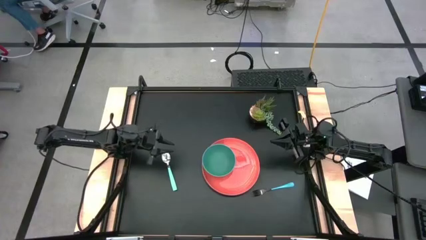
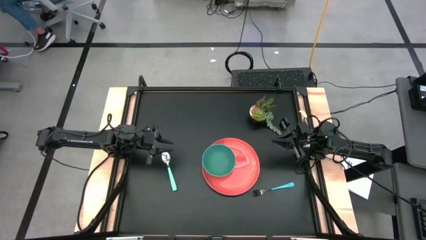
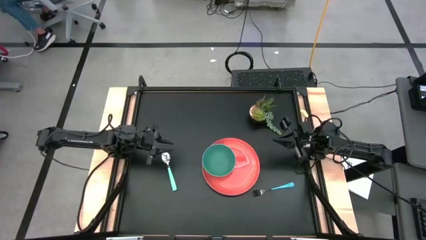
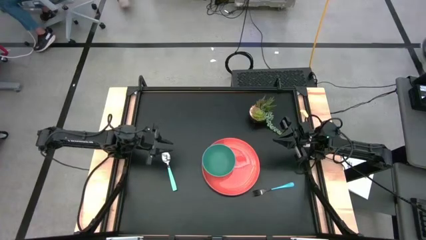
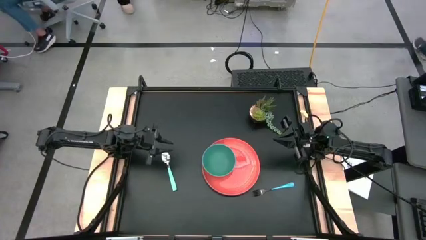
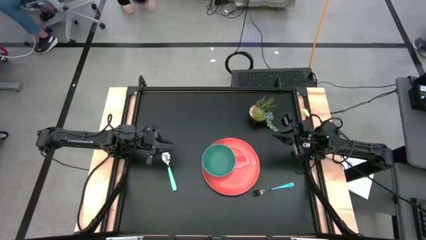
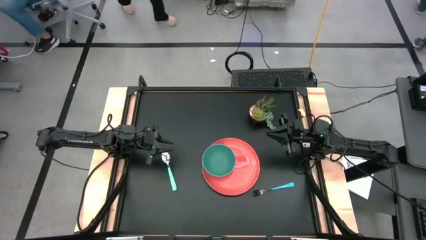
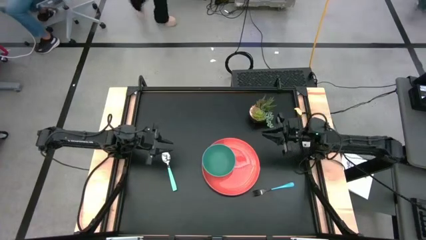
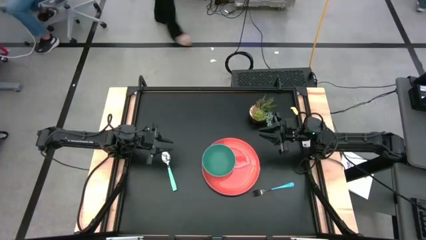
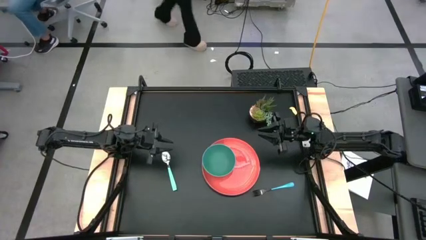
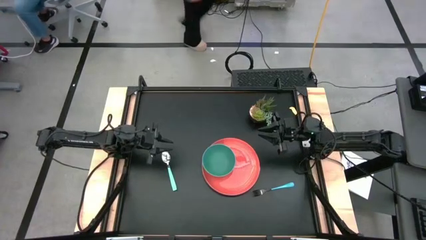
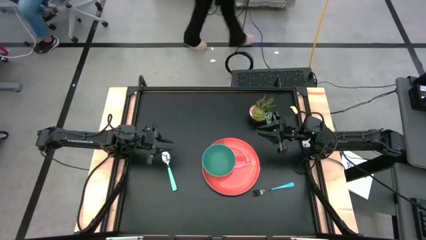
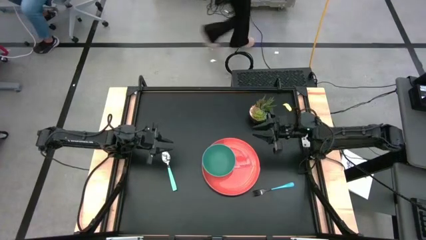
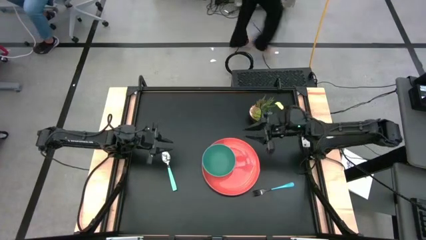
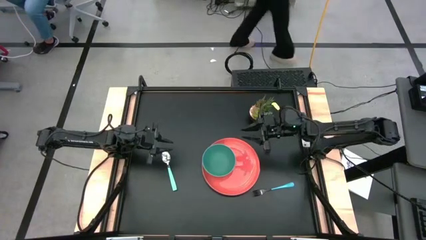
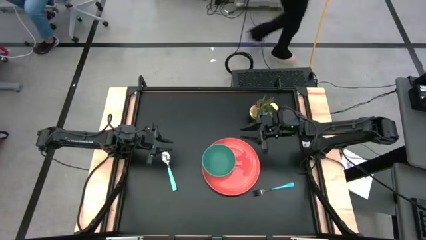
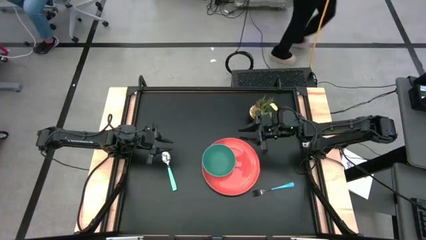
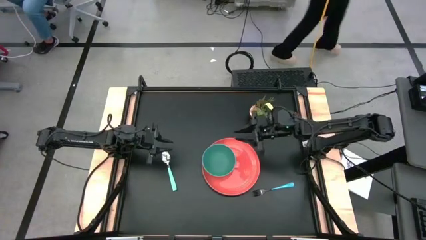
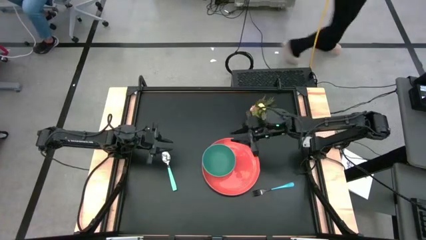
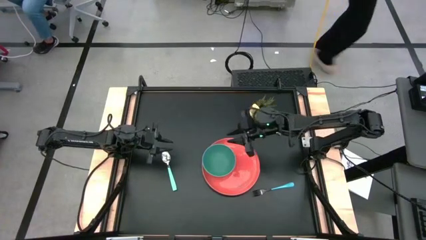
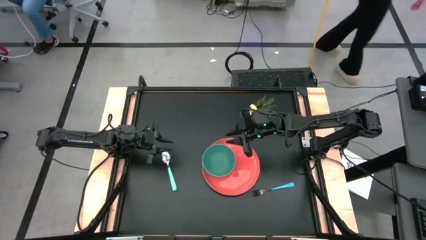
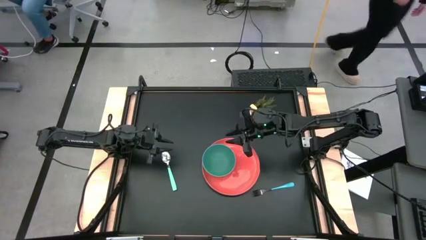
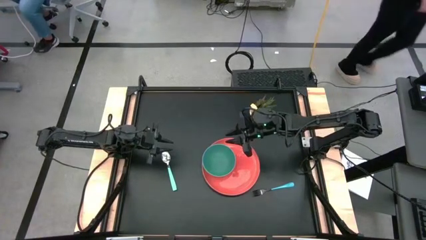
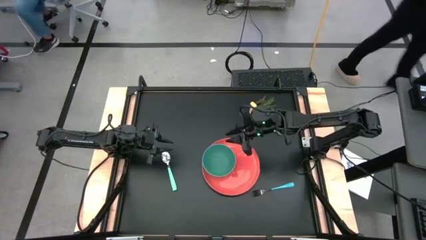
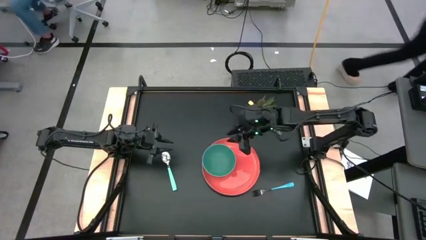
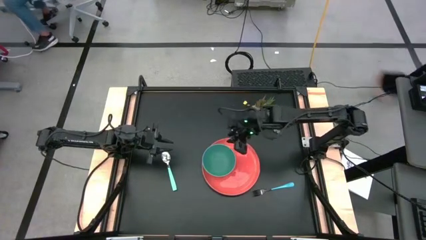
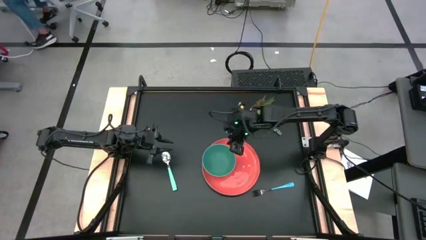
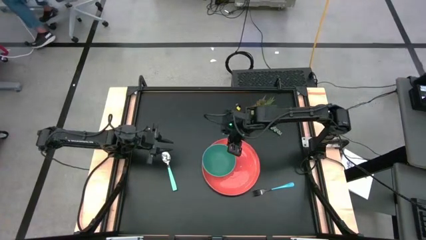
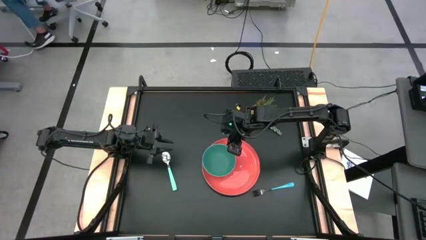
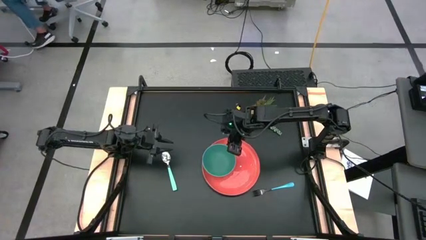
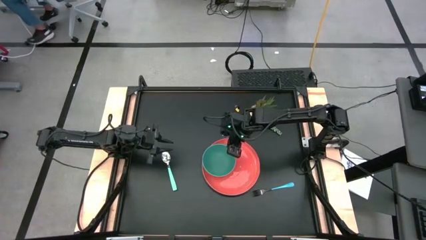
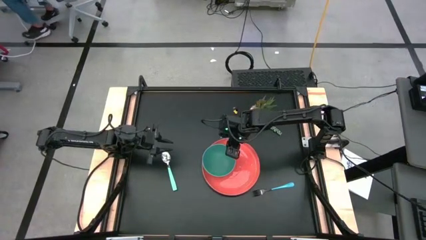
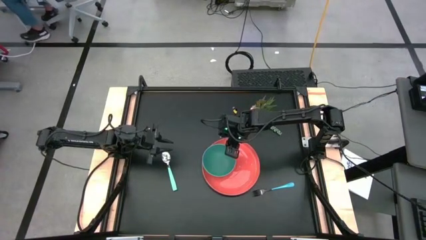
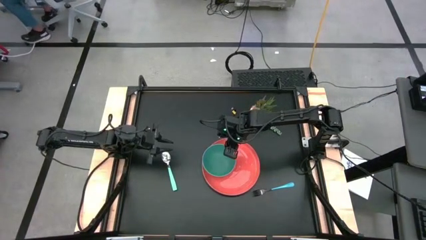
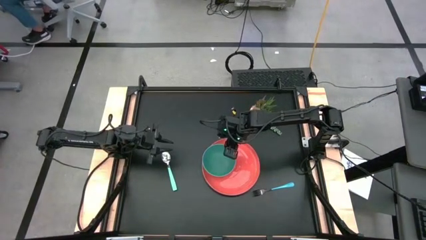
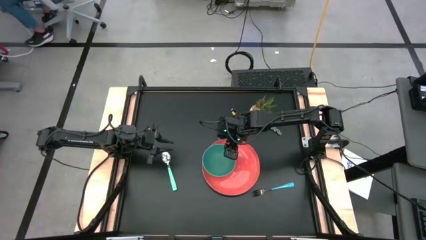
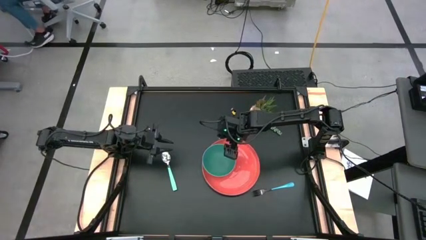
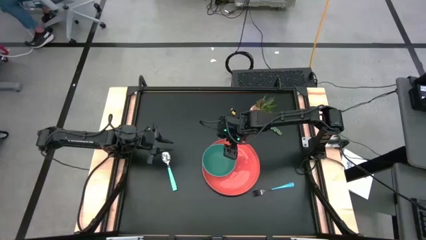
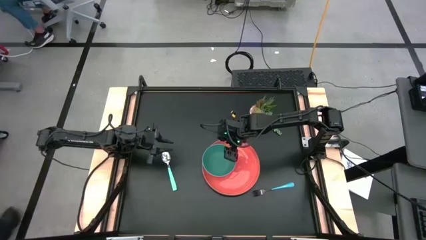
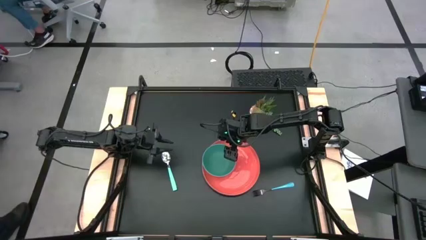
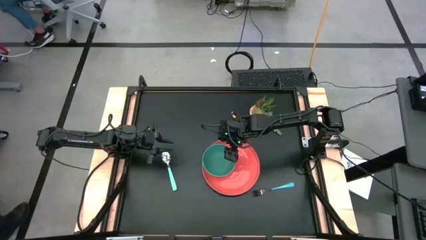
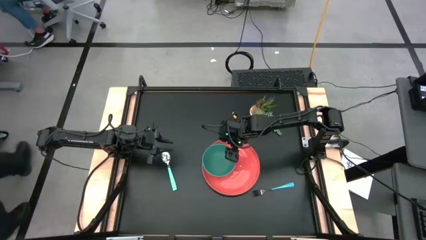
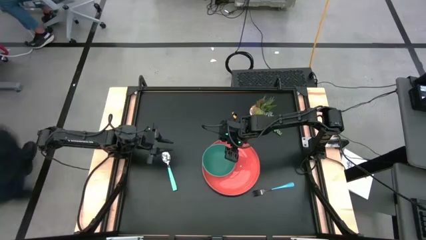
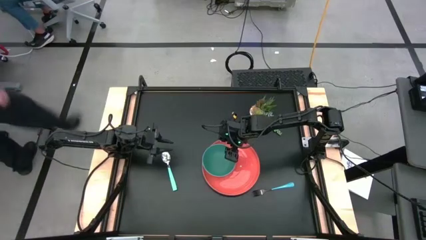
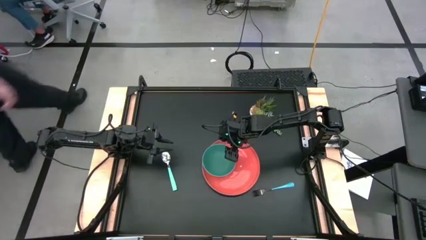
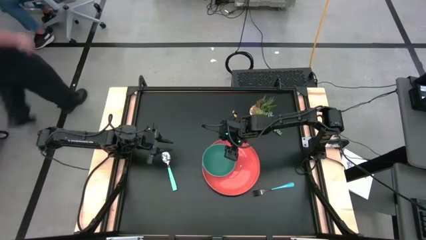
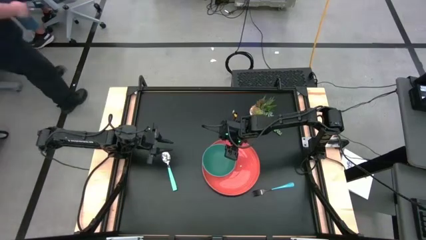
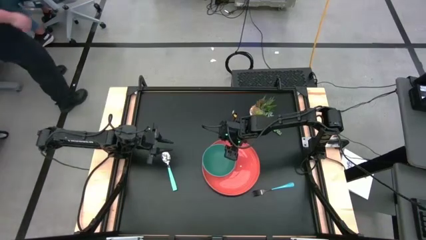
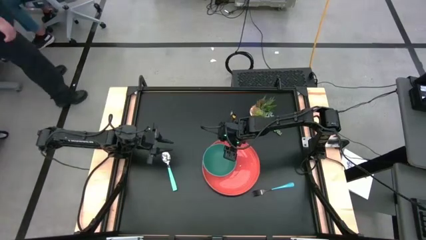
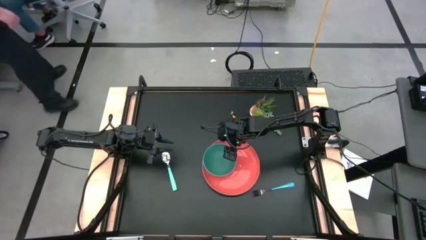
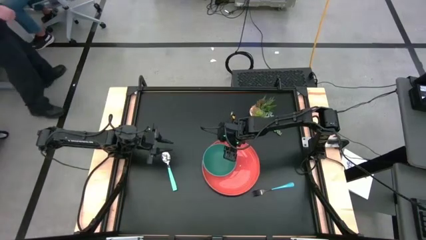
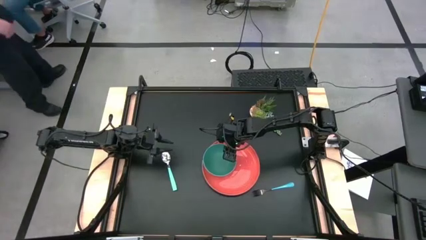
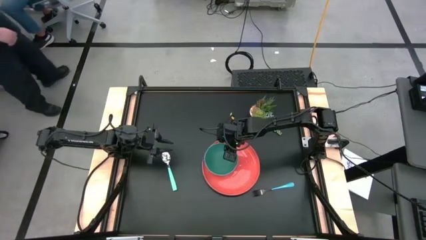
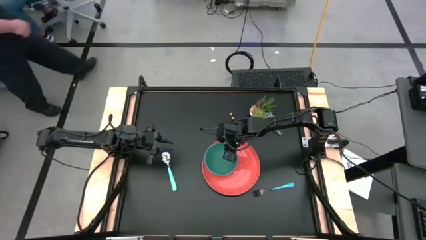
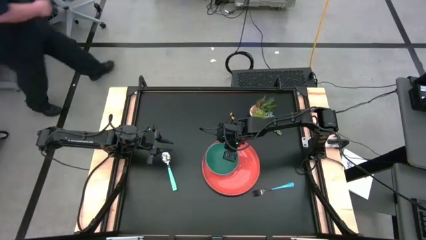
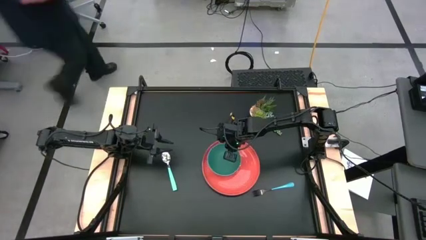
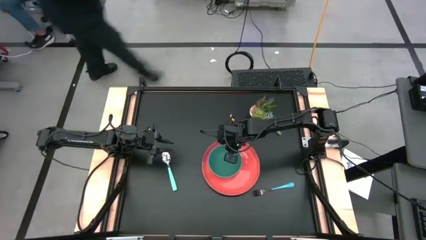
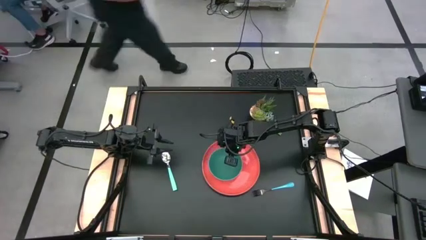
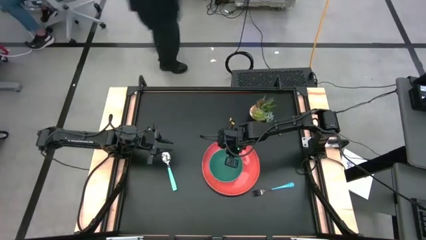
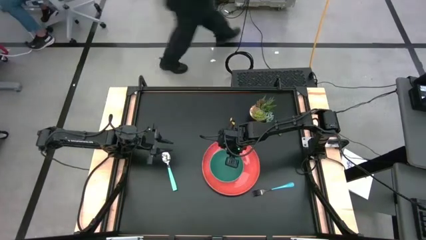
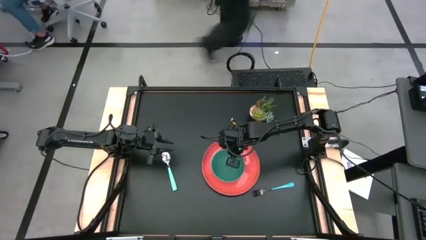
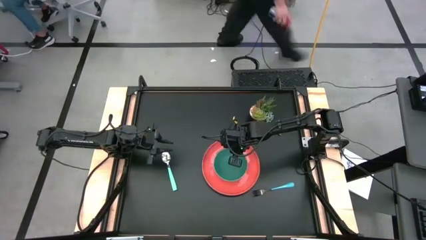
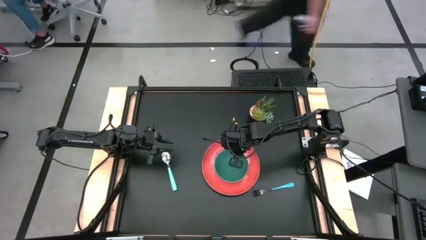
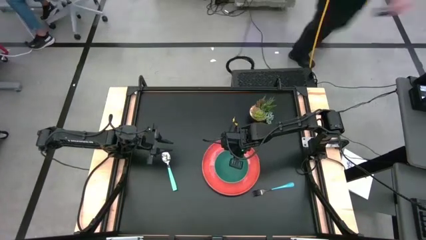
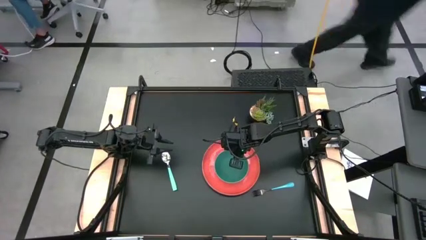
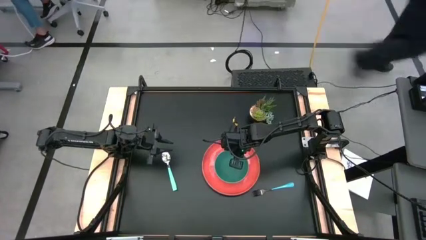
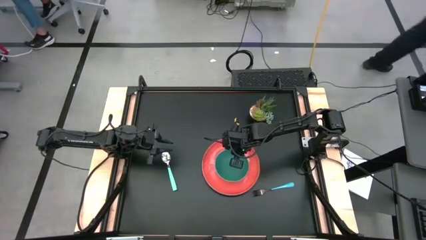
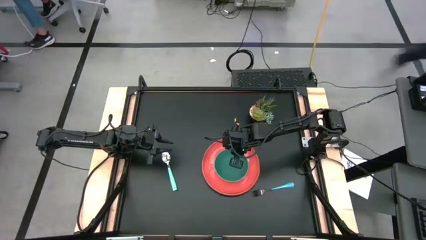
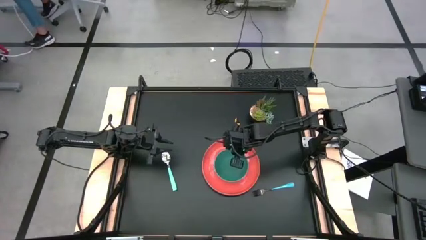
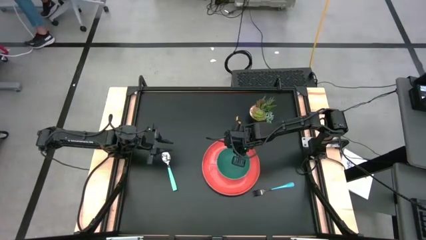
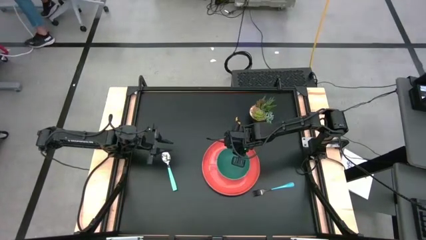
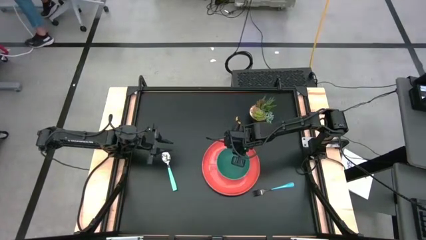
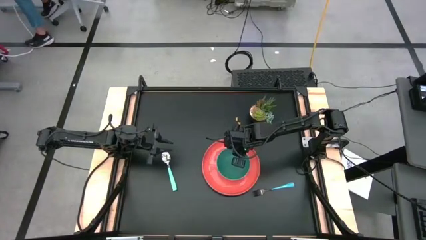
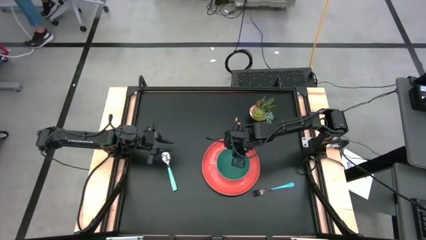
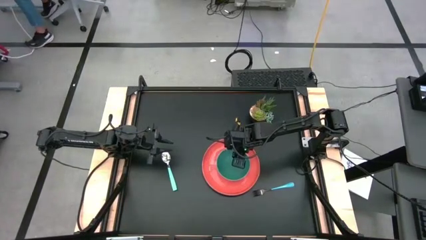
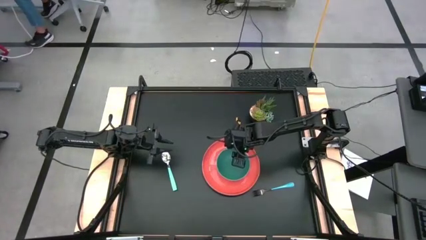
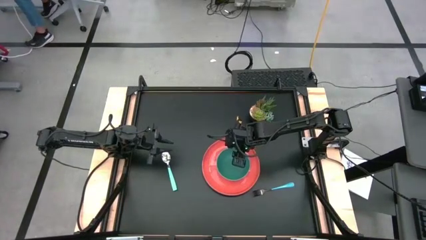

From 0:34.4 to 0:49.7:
Task: Set table place
Put the green bowl on the orange plate

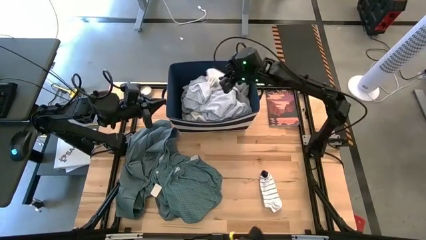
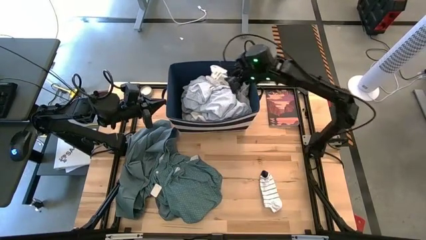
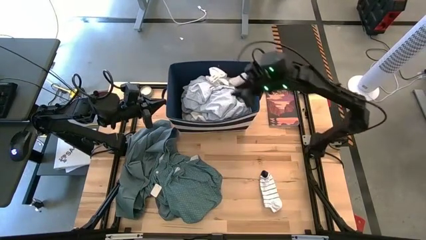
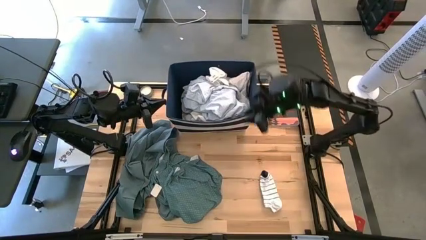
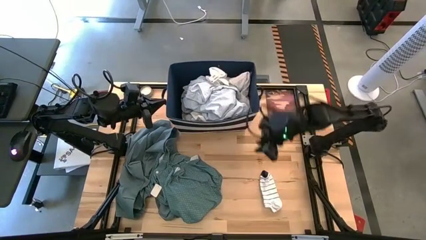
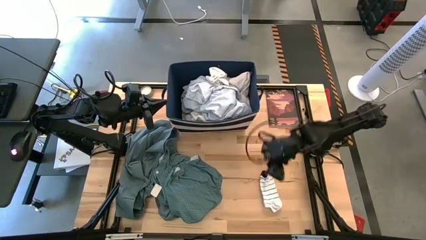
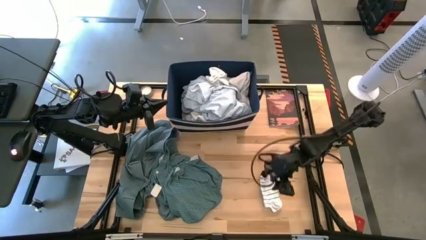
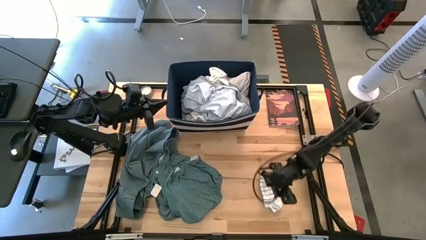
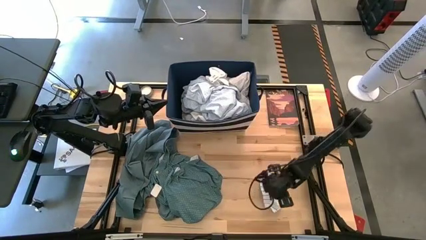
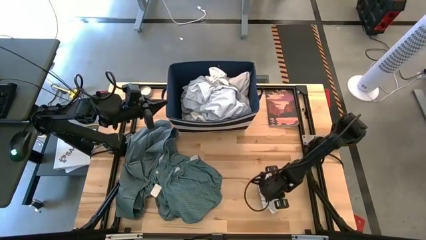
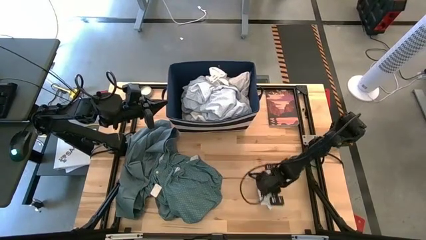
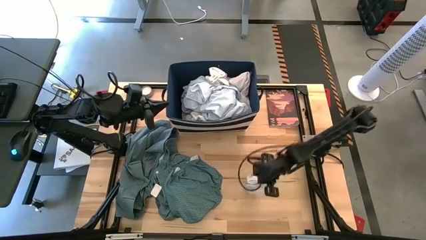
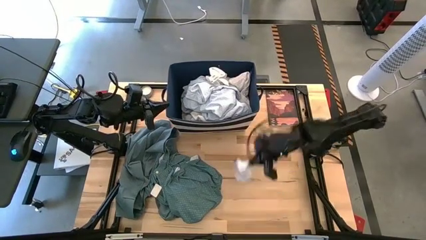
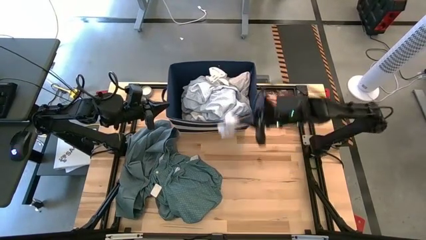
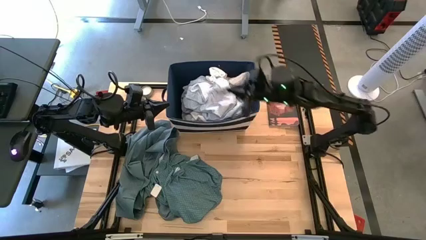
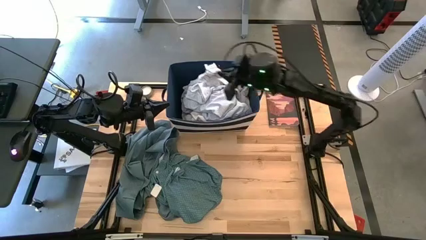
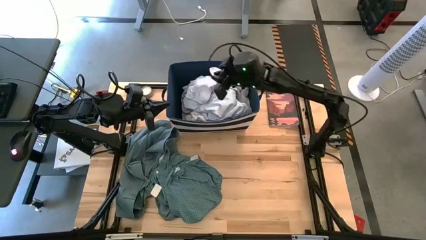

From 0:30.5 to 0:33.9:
Task: Sort clothes
Put the white sock into the blue bin
